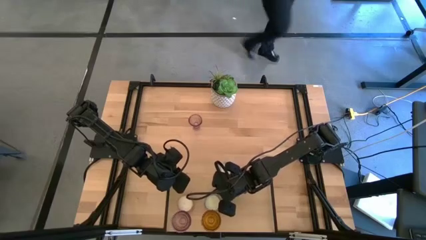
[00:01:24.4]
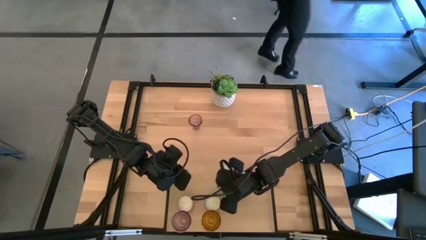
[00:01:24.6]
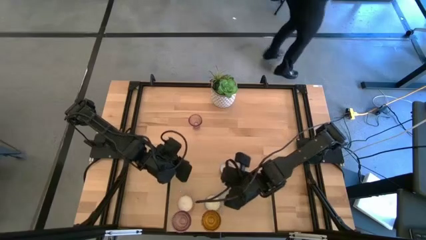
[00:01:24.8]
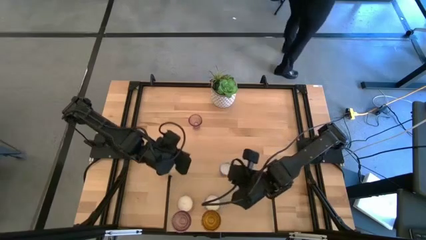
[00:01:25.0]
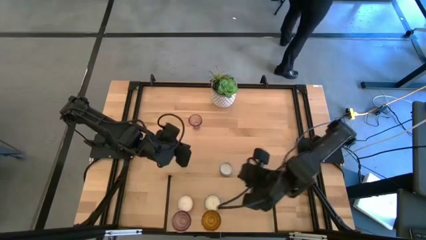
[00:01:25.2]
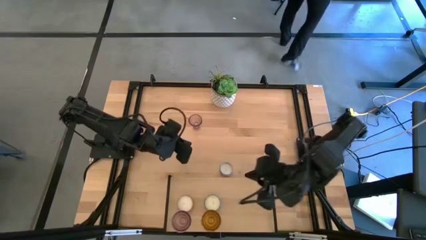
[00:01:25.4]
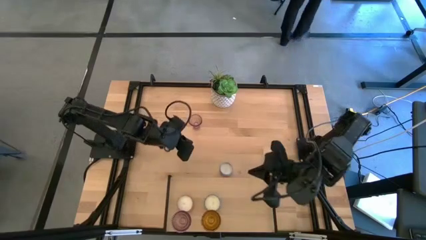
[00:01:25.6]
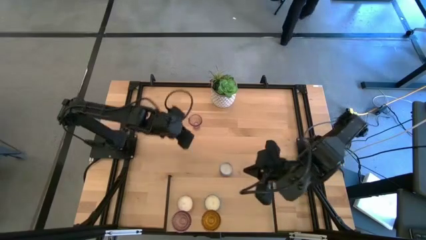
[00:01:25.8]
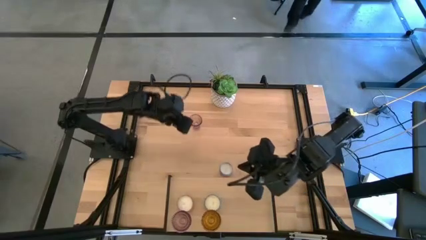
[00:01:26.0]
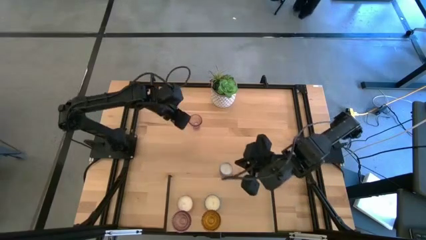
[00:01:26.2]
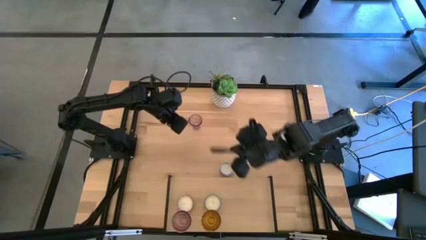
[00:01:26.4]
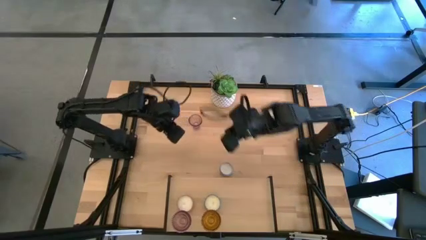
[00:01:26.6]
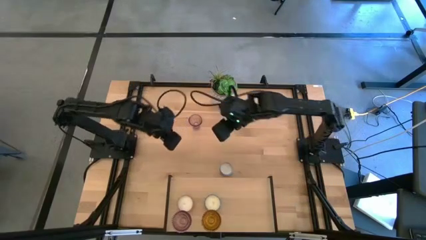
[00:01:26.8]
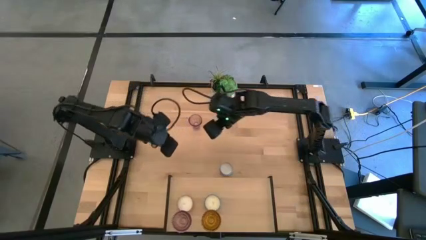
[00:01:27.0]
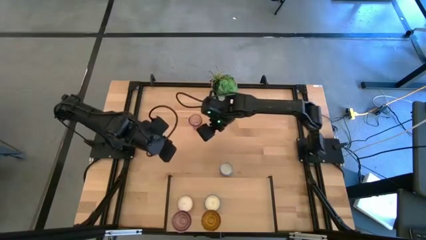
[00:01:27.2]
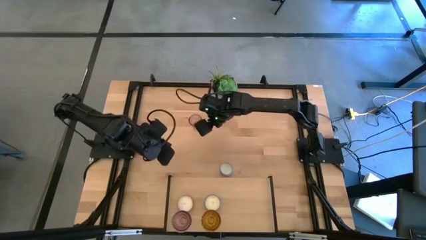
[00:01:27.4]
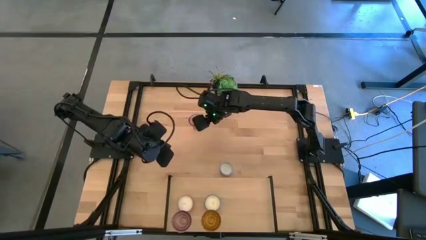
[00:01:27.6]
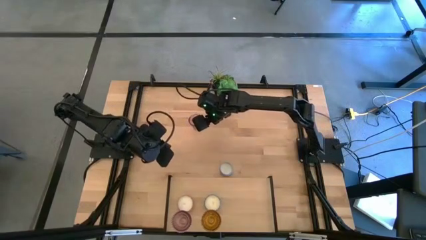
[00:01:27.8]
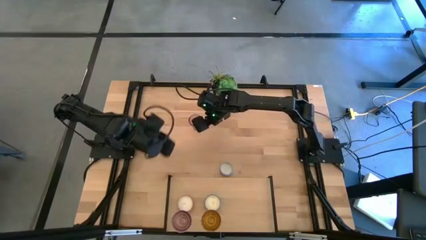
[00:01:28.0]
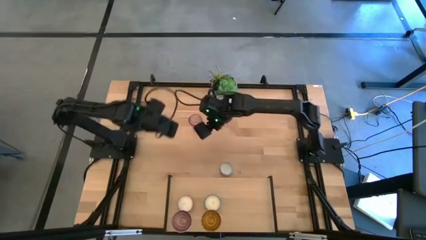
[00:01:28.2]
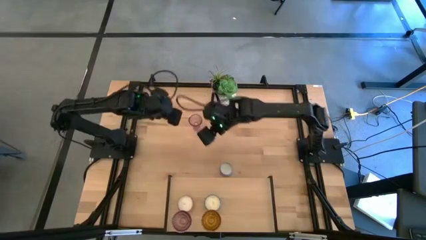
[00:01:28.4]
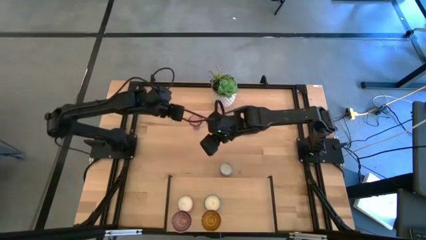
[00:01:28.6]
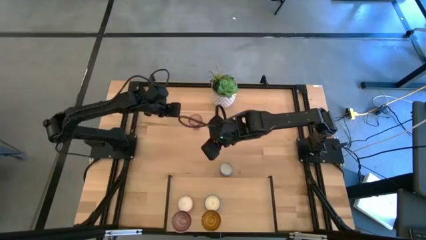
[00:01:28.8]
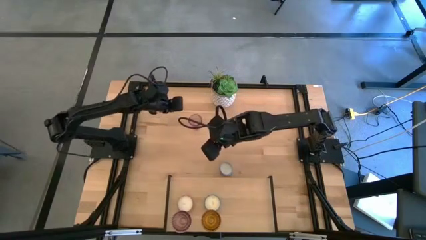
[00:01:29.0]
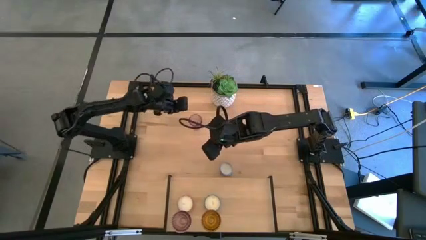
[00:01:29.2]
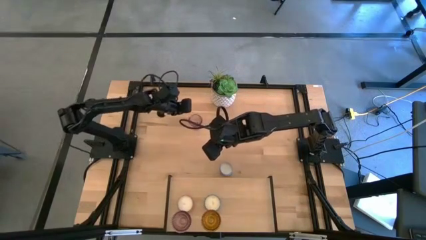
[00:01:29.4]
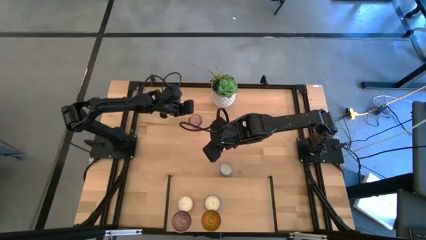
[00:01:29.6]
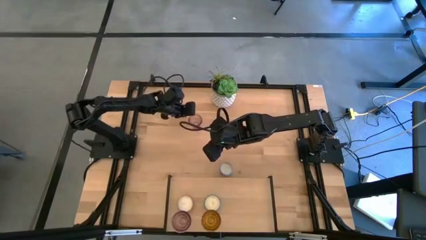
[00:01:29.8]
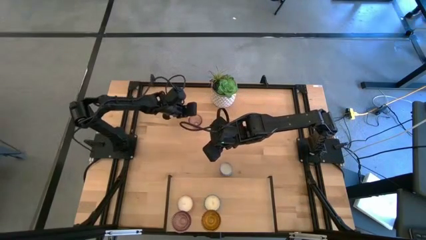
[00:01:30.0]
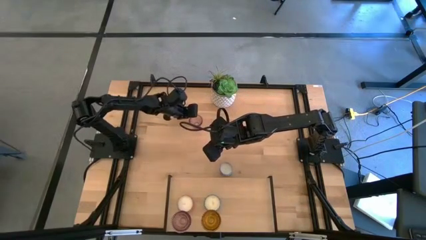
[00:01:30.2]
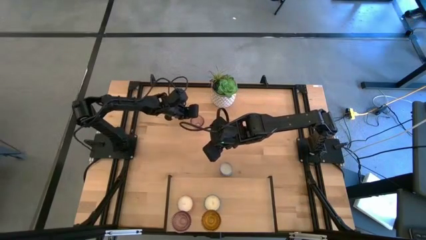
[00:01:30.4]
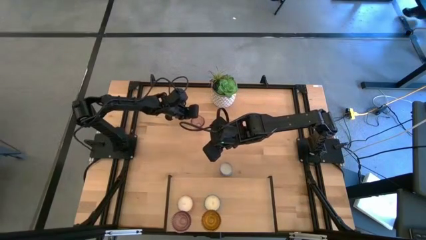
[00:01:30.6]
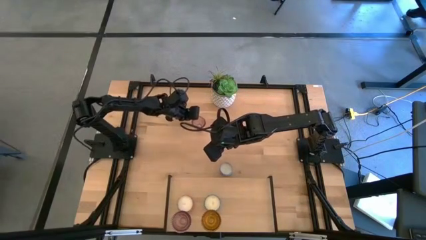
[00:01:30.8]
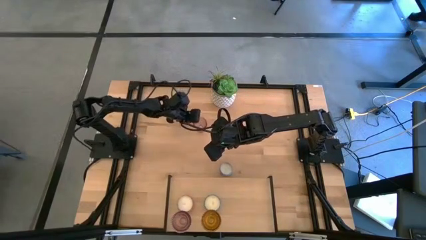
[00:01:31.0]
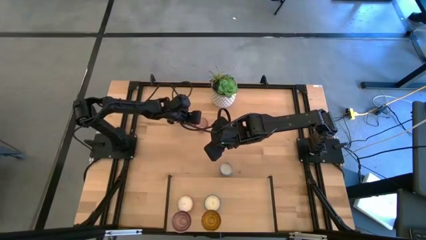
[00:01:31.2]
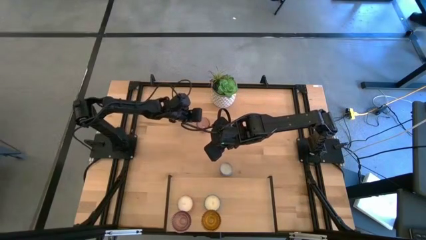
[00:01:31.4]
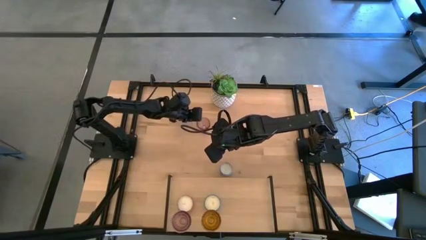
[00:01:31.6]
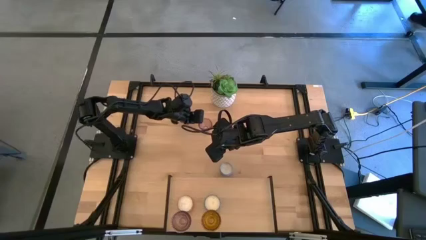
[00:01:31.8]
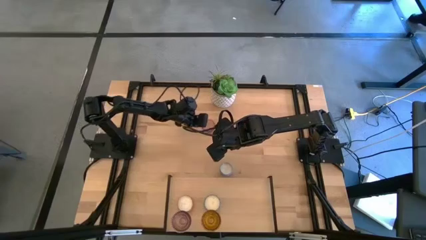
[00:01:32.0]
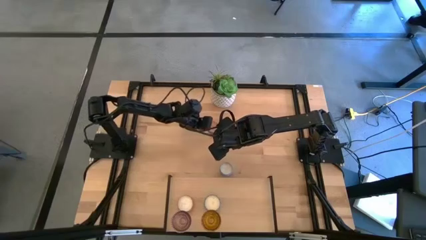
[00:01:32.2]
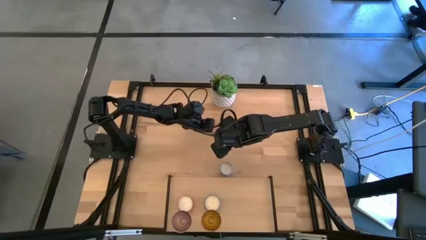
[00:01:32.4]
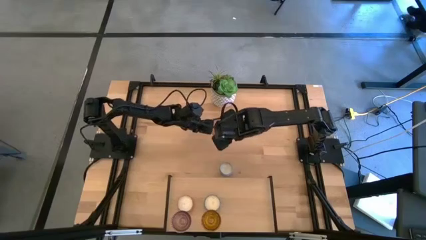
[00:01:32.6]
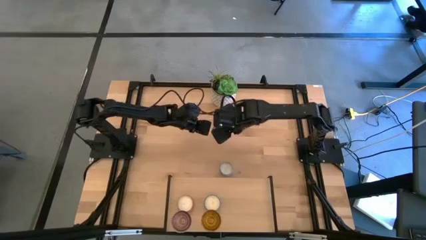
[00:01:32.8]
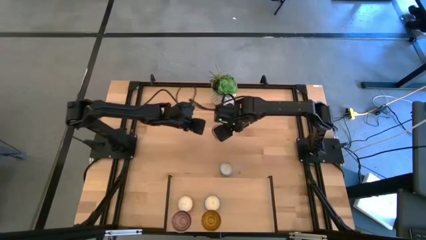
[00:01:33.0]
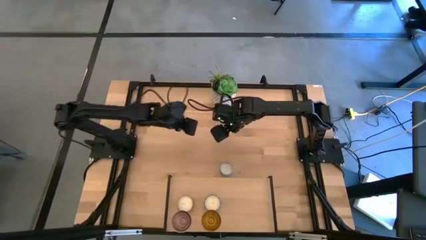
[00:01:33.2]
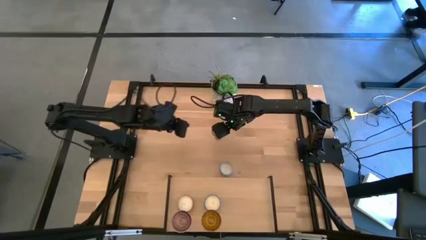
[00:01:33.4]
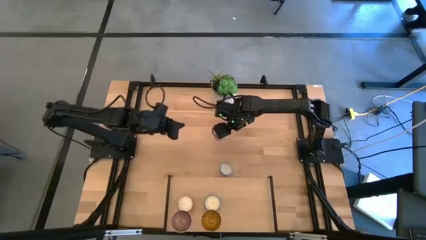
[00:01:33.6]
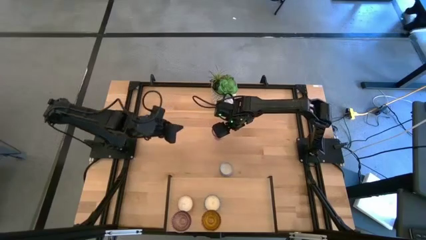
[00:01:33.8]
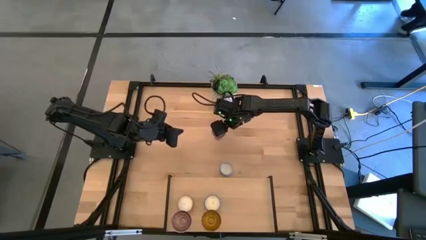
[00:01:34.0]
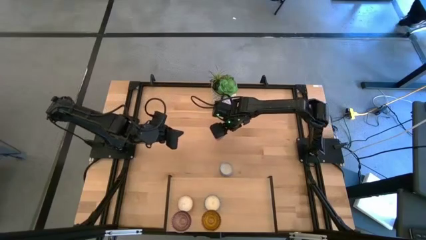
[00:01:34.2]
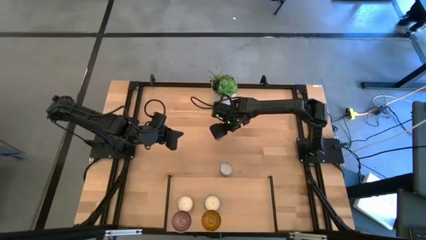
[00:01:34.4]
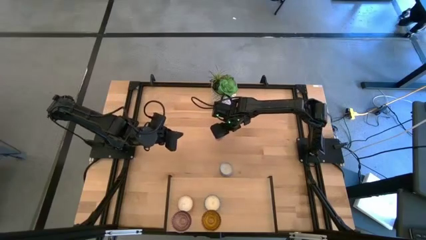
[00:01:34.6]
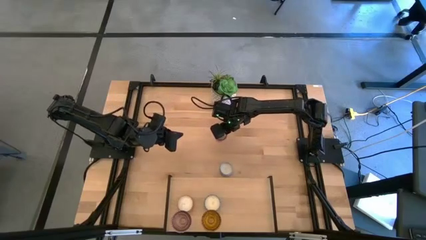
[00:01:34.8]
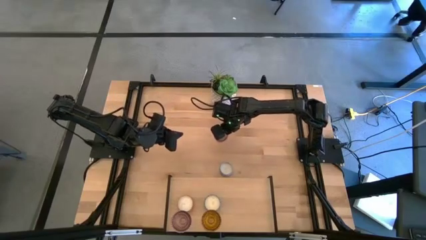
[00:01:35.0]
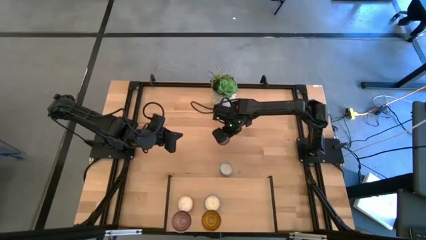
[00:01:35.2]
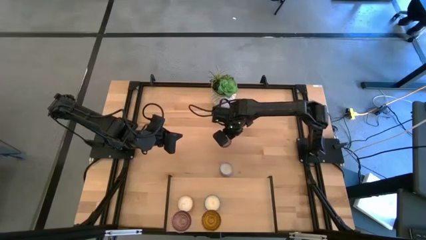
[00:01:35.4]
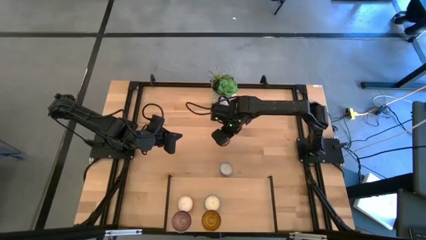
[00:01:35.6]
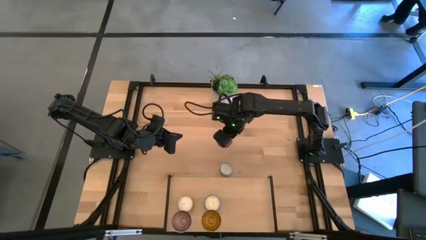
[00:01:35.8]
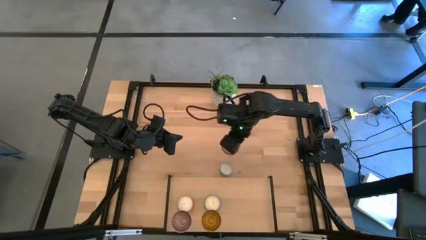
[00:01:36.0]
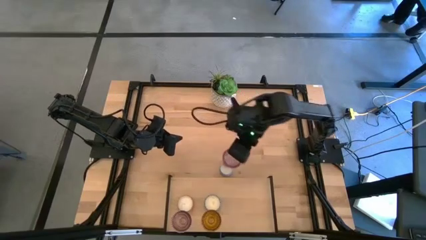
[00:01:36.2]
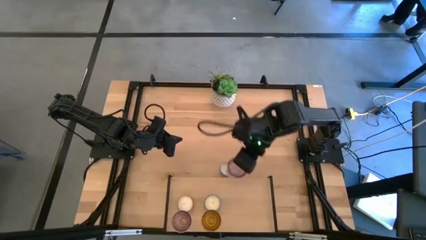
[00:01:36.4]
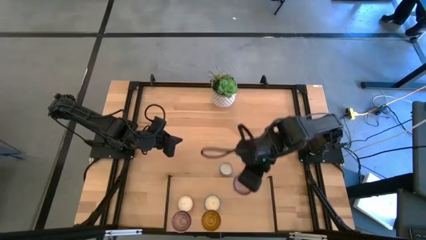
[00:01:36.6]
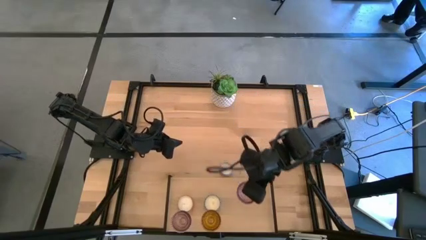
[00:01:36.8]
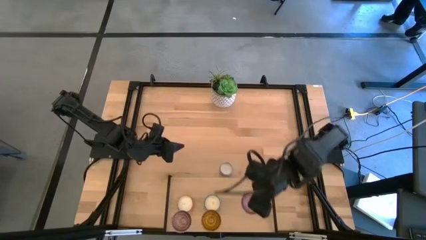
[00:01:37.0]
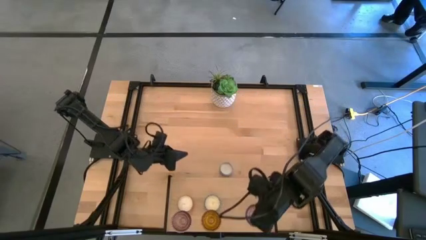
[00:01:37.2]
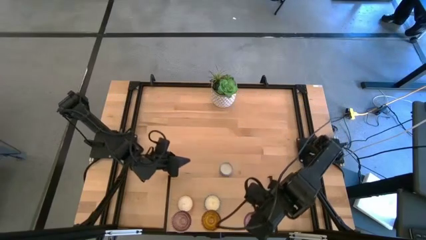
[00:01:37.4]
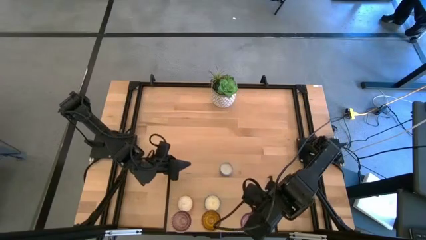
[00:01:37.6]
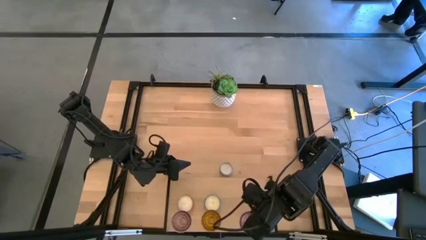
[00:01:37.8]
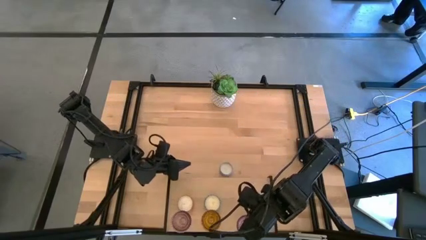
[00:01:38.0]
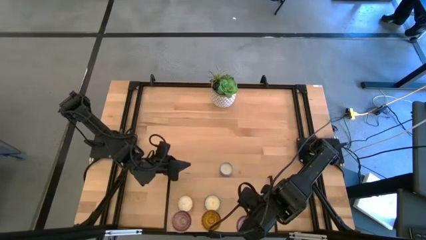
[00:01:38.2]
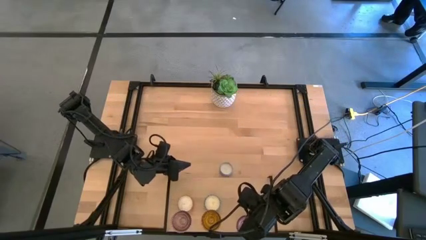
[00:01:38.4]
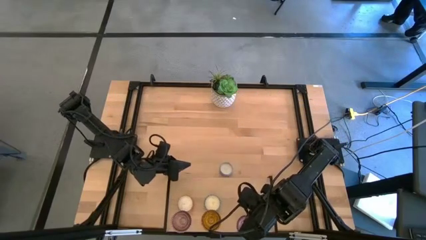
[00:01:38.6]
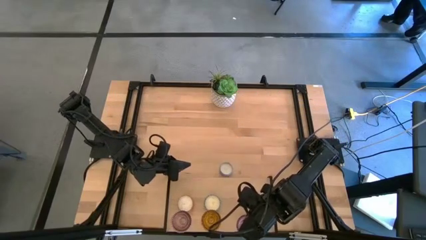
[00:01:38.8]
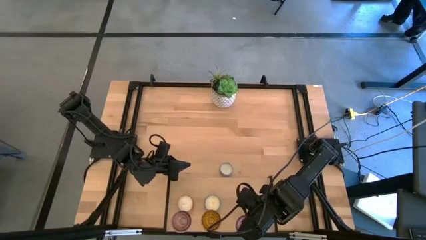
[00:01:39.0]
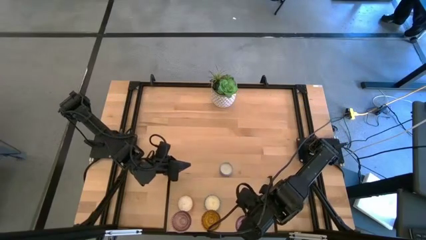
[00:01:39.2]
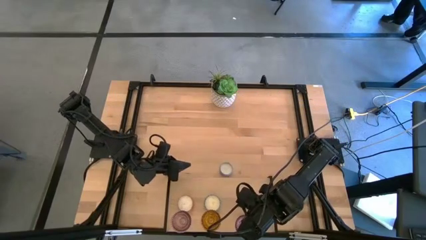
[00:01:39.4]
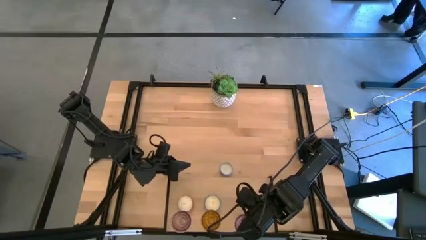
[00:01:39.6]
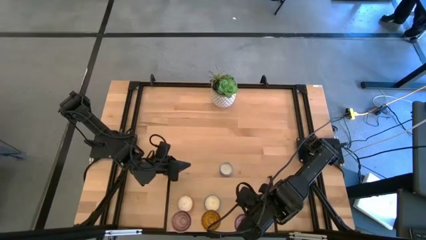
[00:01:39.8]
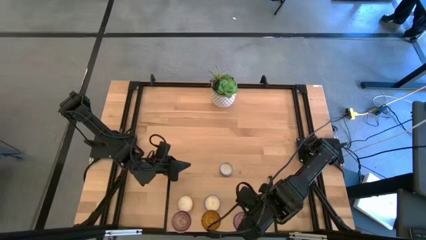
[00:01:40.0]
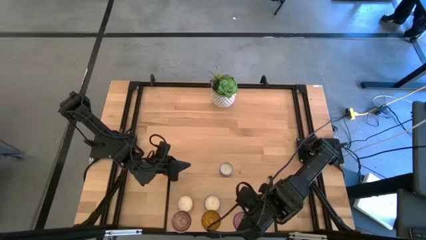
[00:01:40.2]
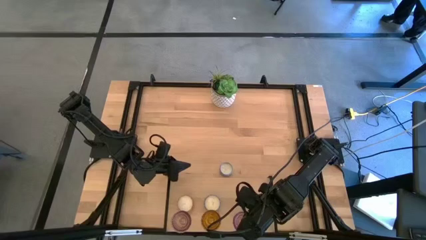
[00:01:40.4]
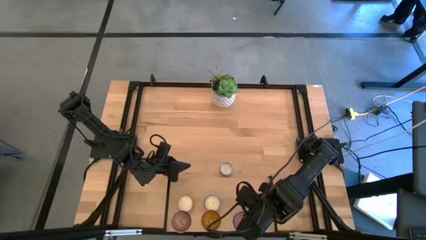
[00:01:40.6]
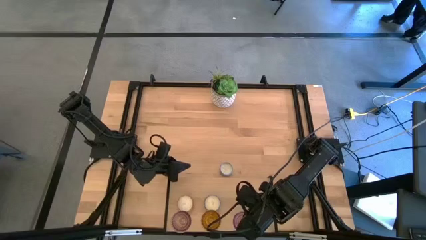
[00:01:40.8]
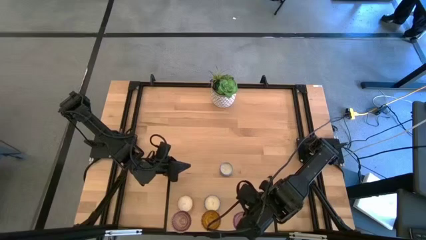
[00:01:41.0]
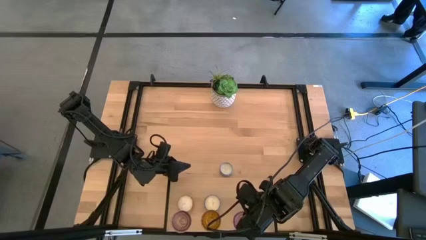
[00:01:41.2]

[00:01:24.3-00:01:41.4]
Task: Pick & Place candle stick holders
Put the pink candle holder on the shelf
